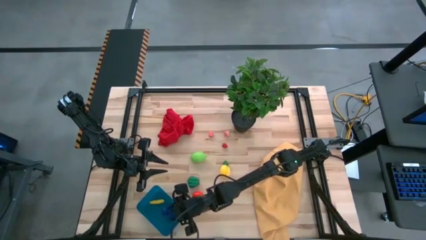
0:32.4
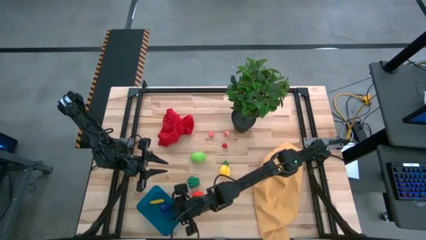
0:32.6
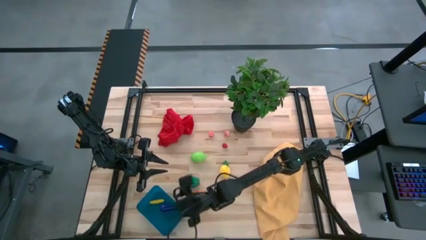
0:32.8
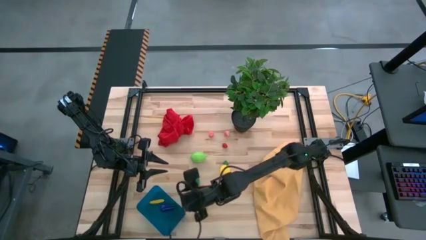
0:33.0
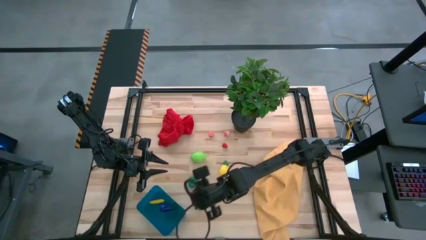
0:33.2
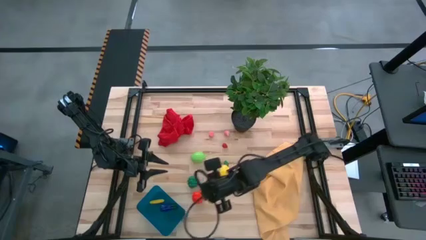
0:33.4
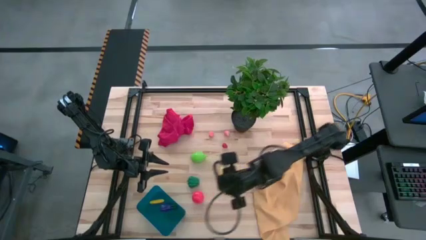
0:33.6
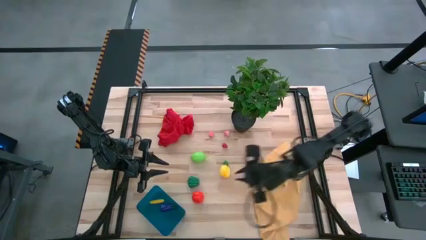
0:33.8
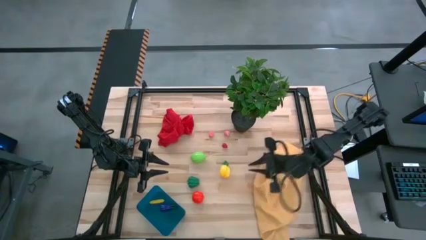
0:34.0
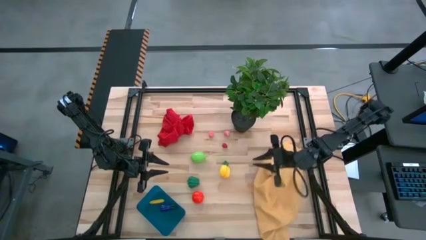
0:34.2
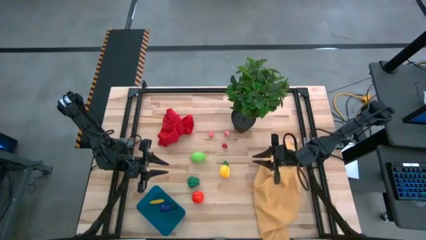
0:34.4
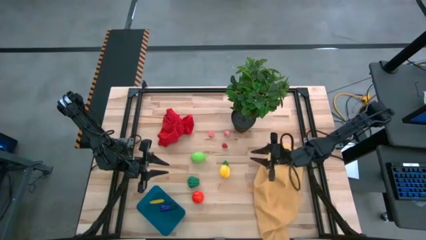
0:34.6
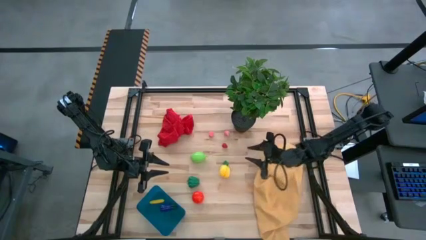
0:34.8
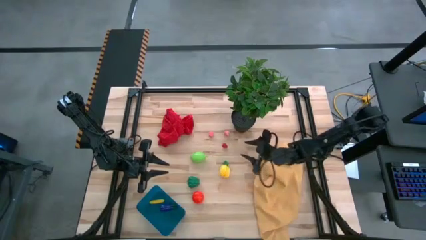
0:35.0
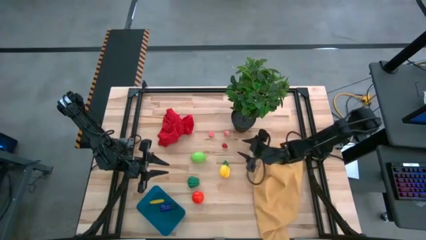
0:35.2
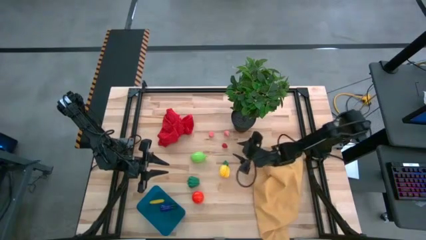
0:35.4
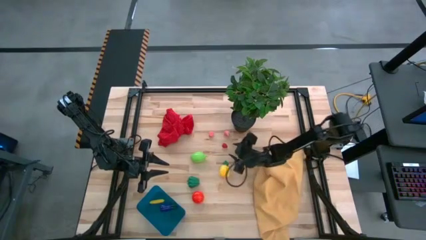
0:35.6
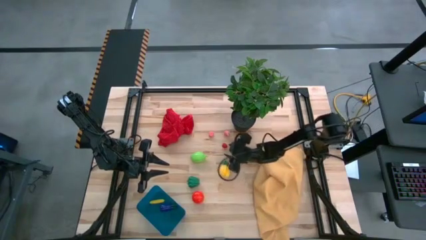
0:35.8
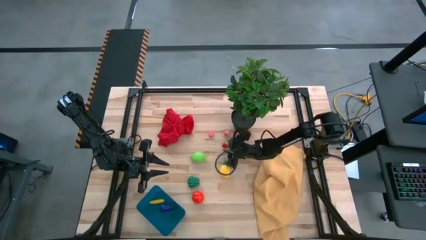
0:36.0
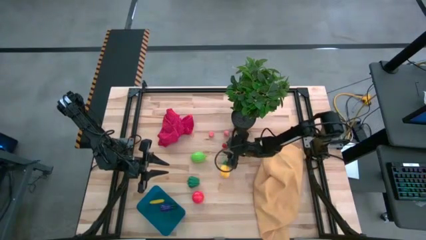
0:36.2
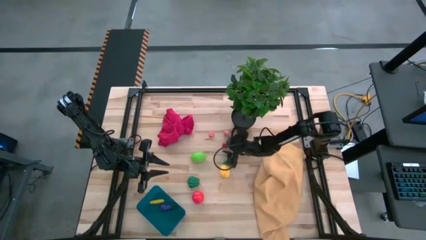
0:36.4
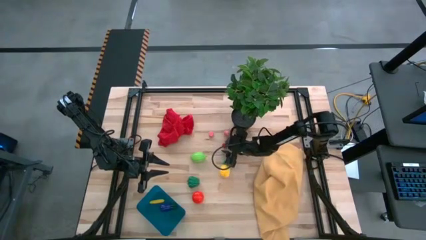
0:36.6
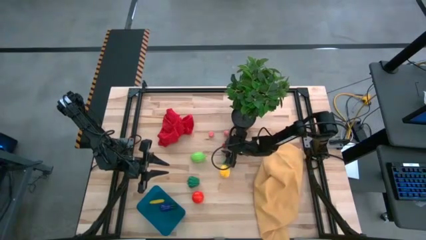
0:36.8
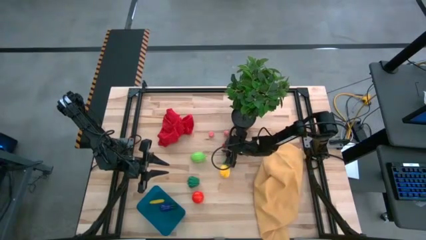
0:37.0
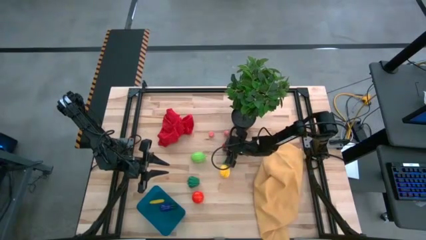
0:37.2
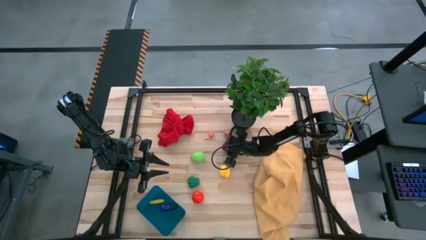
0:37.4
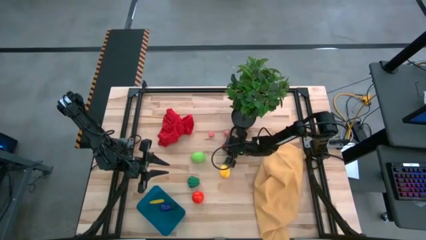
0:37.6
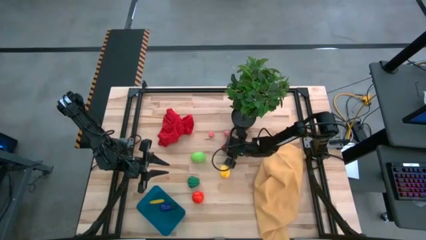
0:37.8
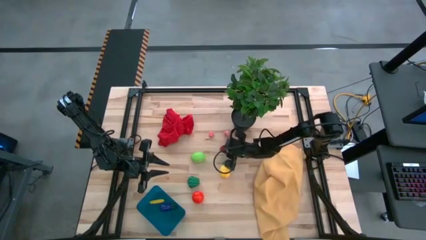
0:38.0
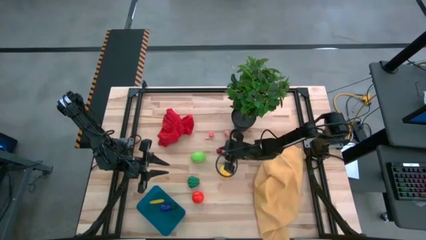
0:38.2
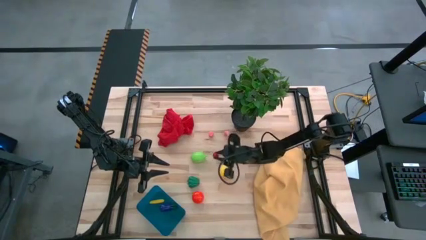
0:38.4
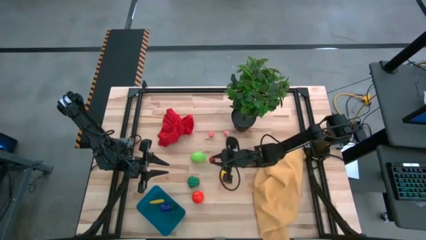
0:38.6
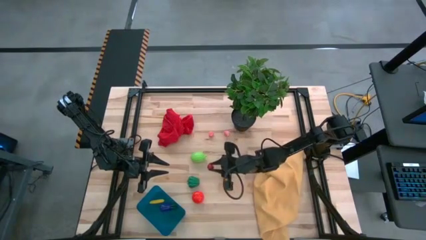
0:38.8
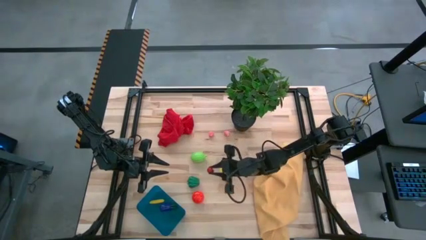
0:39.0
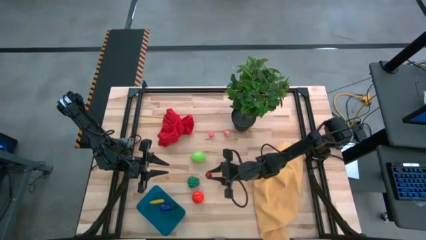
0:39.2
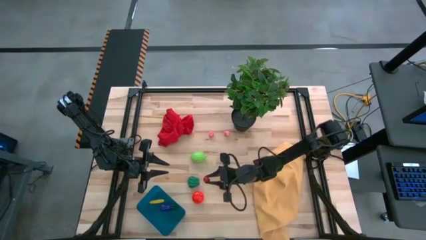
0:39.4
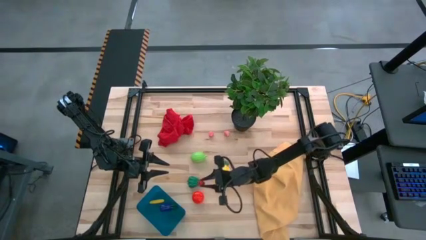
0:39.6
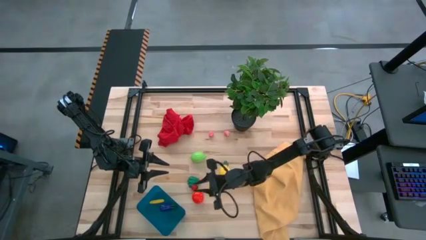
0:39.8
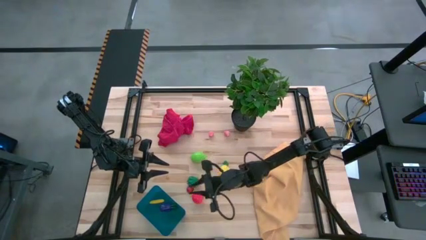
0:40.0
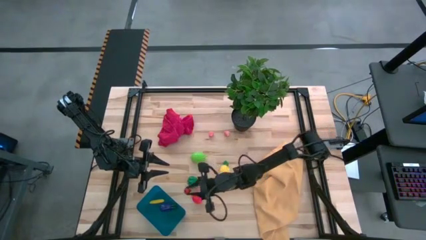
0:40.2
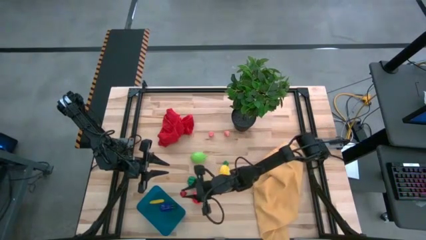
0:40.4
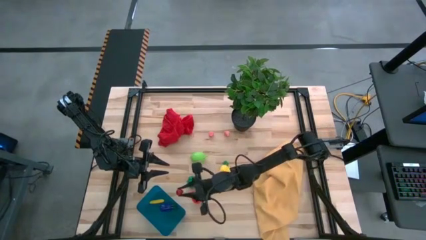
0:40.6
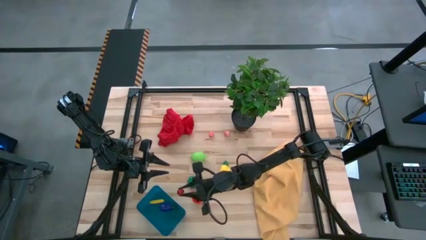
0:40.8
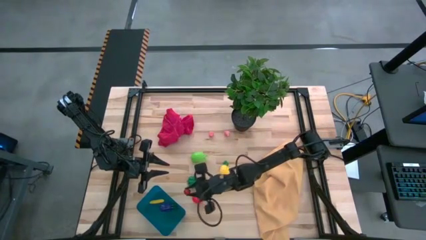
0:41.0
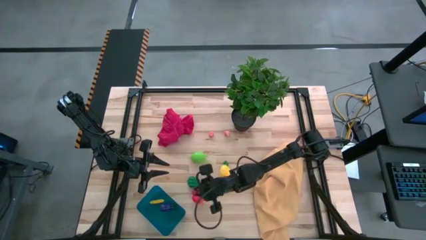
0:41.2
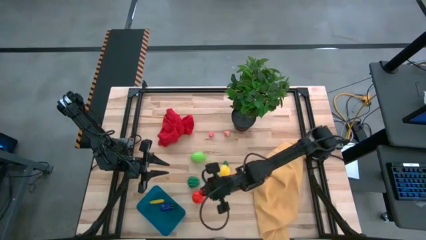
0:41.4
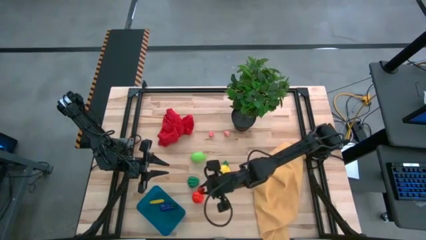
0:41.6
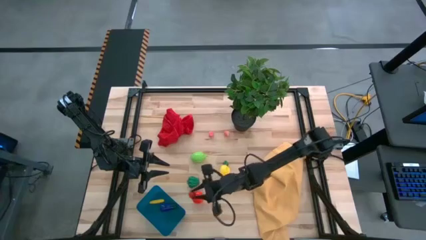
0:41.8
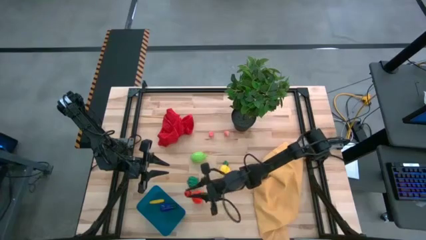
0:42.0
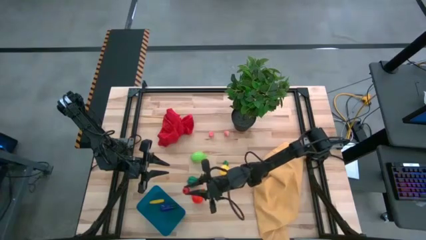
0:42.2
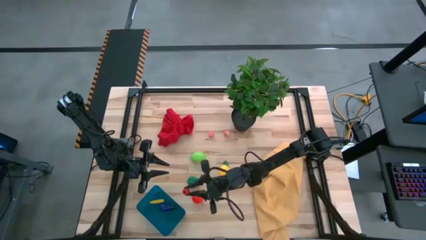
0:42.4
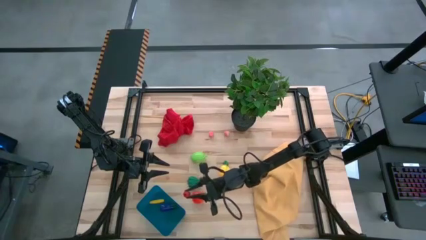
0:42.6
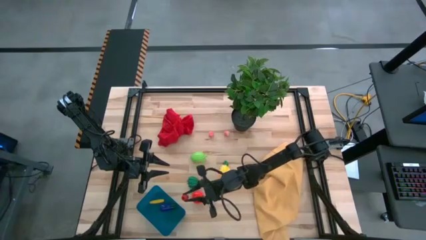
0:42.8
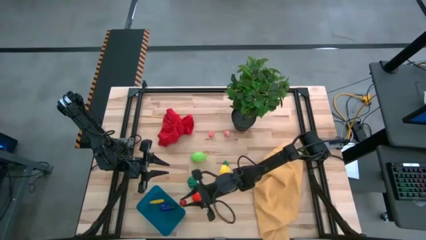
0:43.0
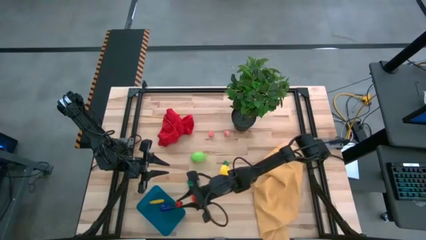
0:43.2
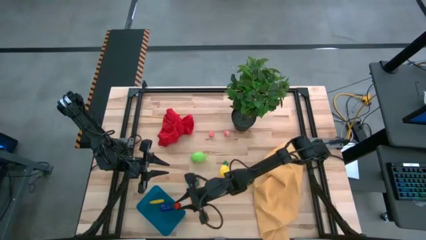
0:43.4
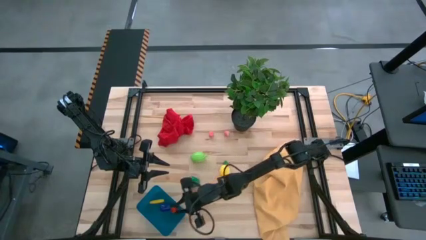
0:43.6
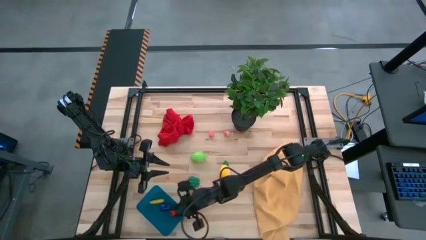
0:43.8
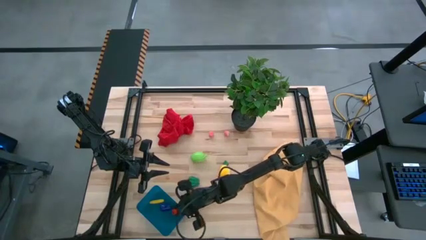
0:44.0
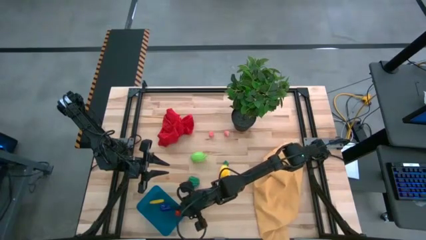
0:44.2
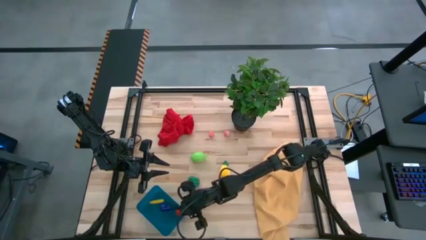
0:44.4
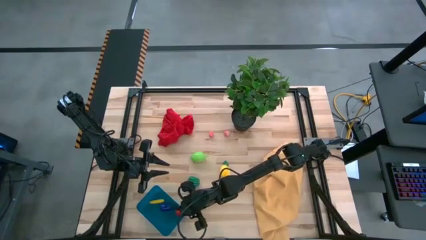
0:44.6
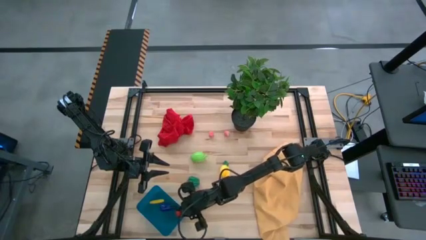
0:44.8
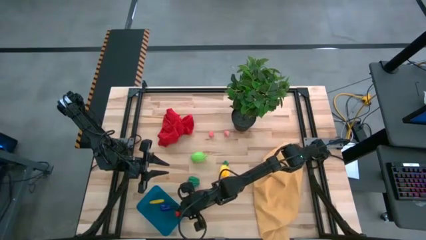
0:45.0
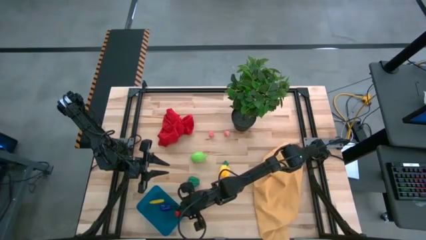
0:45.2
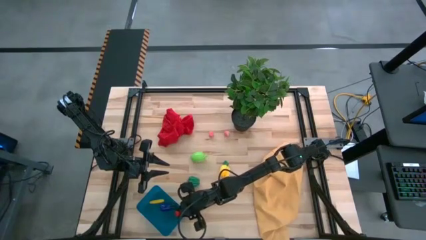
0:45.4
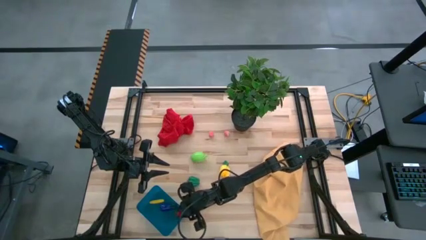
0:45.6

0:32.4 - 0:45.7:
Task: Pick and placing Produce into tupperware
Put the red raspberry into the blue bin

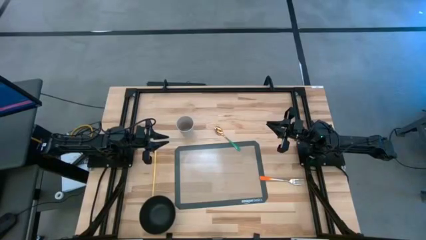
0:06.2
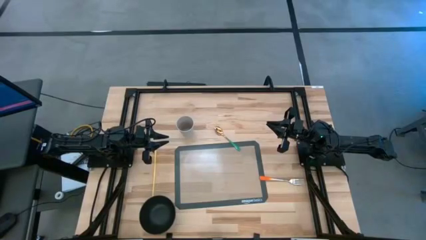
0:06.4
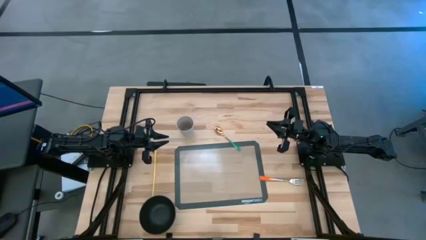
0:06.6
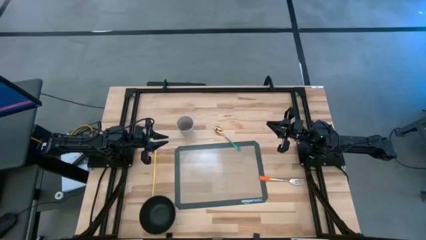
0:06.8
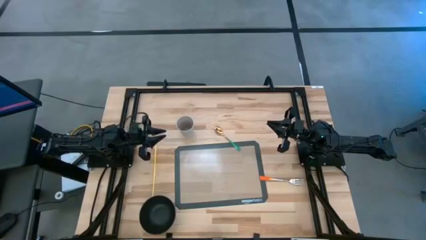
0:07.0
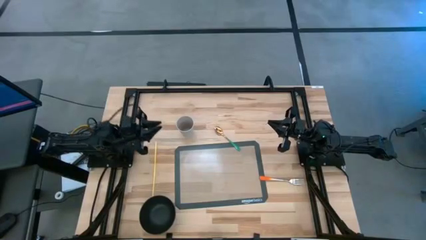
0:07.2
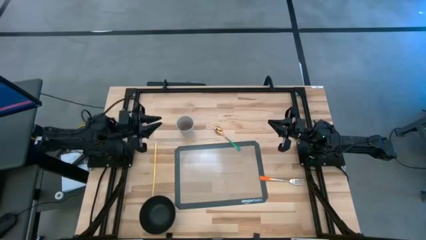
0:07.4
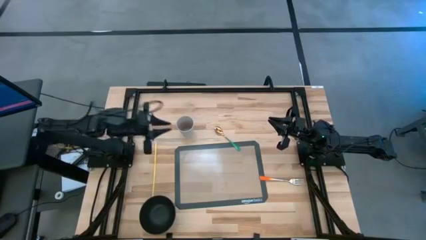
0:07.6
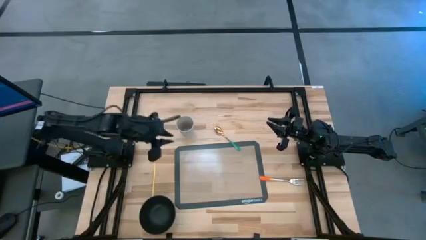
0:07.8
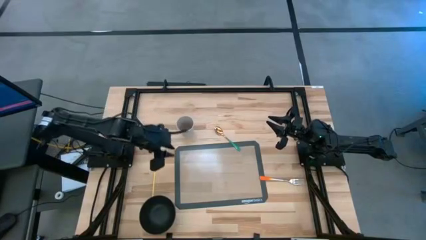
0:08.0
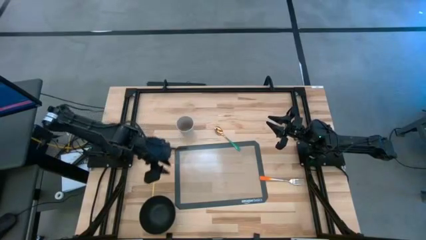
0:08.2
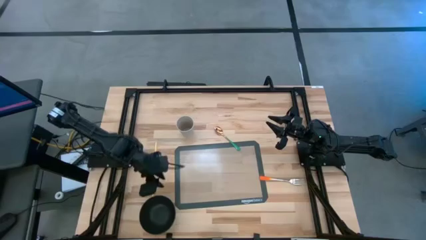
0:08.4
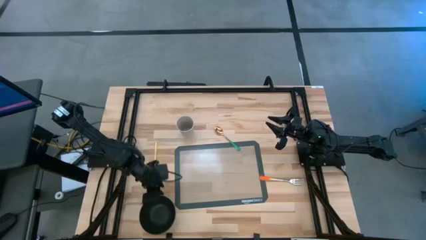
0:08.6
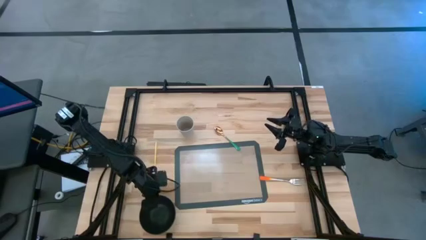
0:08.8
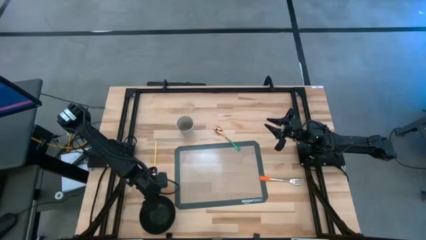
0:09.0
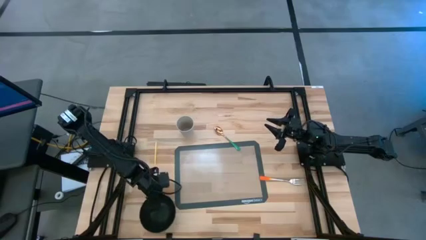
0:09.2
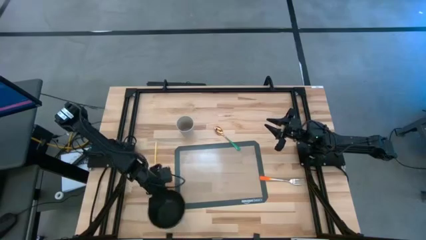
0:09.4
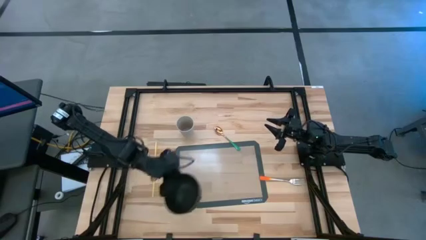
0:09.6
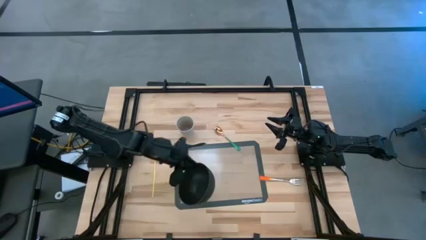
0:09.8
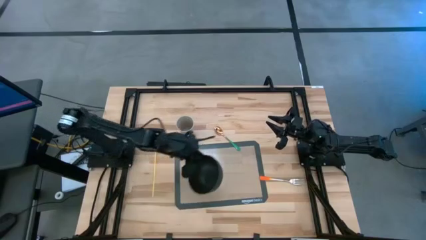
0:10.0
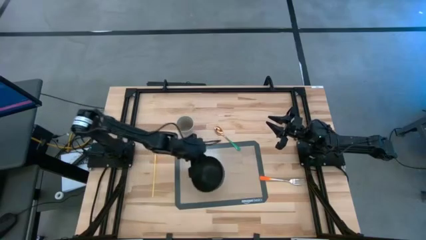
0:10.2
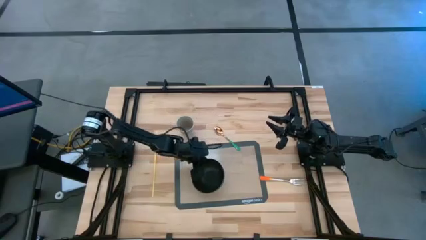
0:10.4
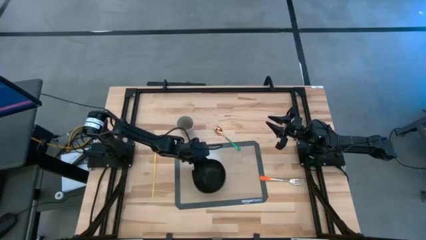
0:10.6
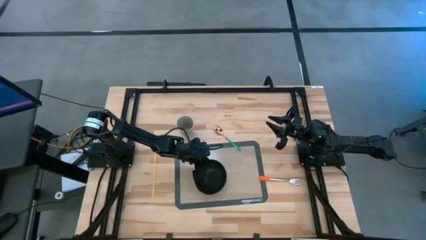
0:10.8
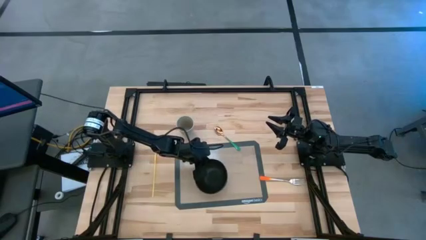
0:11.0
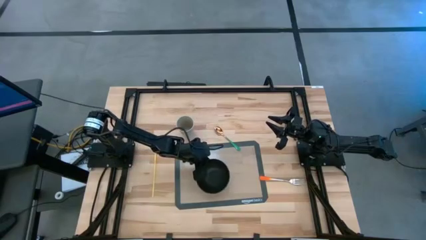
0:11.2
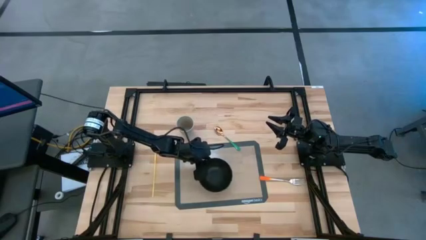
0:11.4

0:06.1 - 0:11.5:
Task: Pick & Place Utensil
Put the black bowl on the transparent mat
